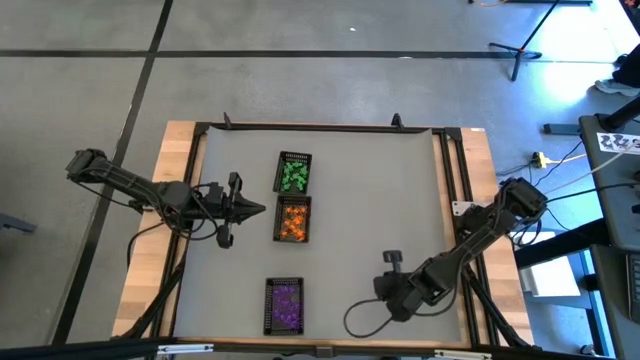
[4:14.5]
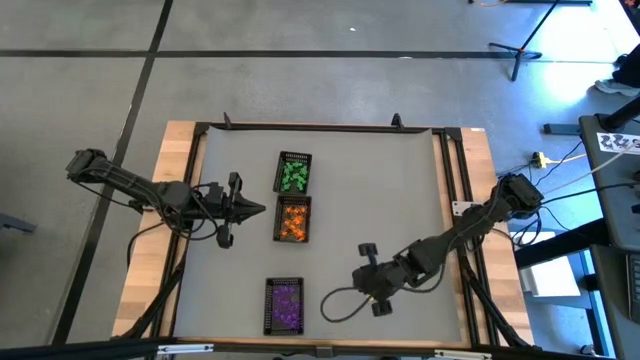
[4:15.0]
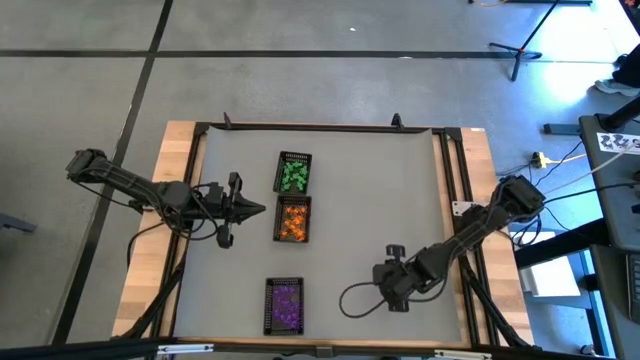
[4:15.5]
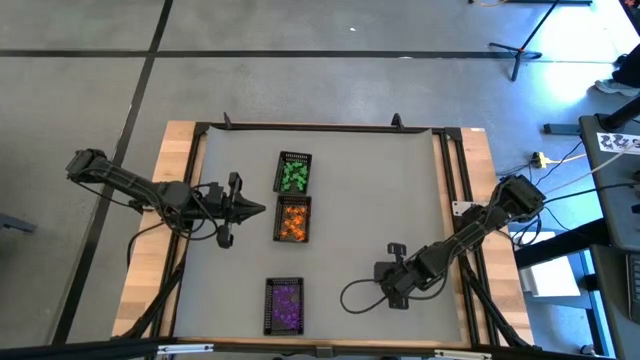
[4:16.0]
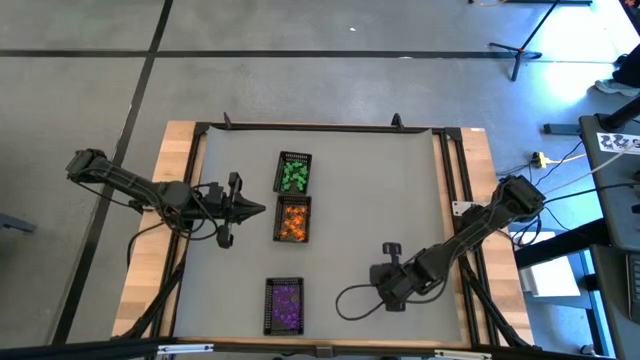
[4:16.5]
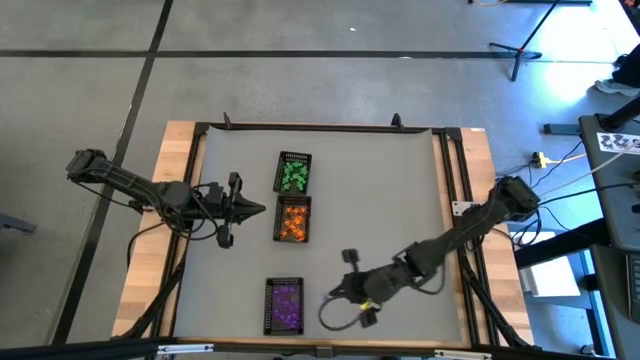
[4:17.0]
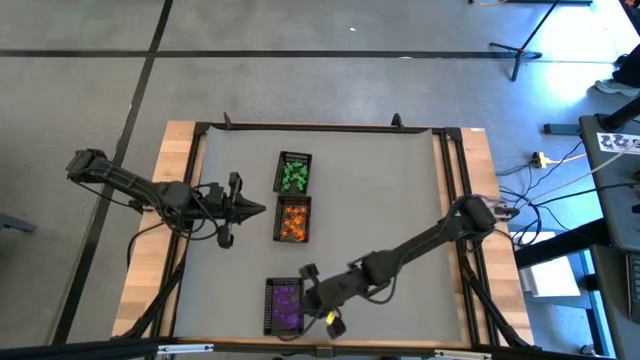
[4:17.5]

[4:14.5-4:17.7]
Task: Sort Halloween decoration
Put the violet spider toy into the bottom black bin

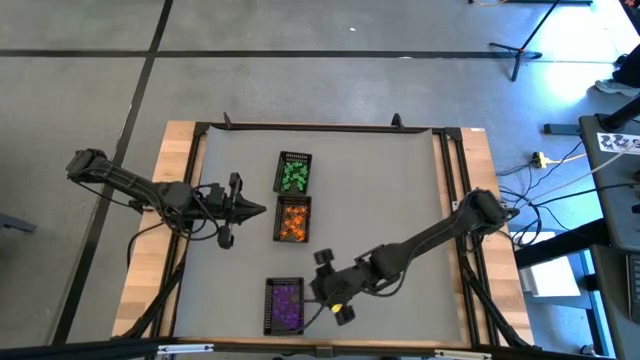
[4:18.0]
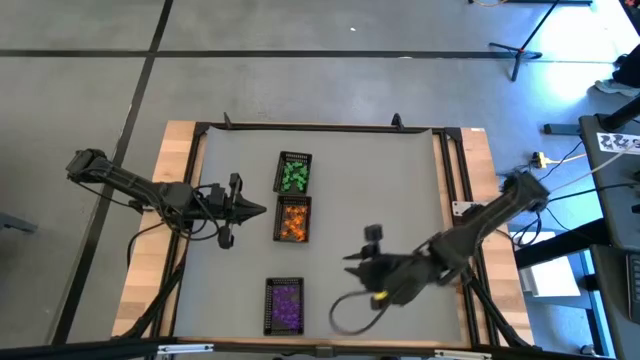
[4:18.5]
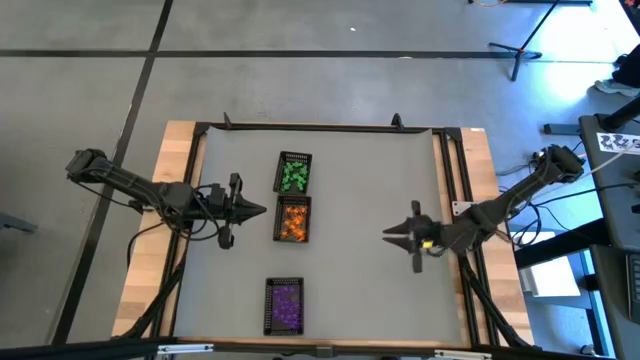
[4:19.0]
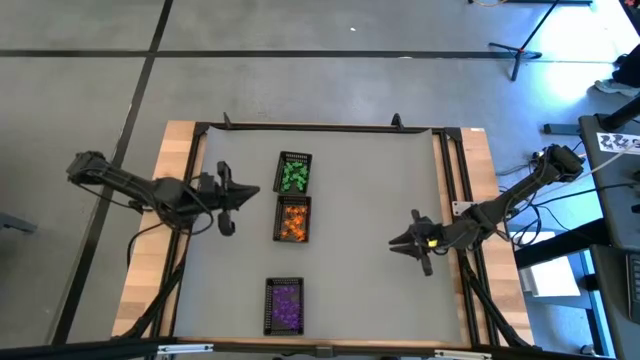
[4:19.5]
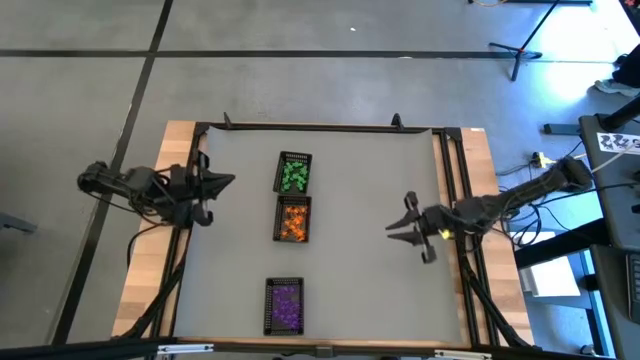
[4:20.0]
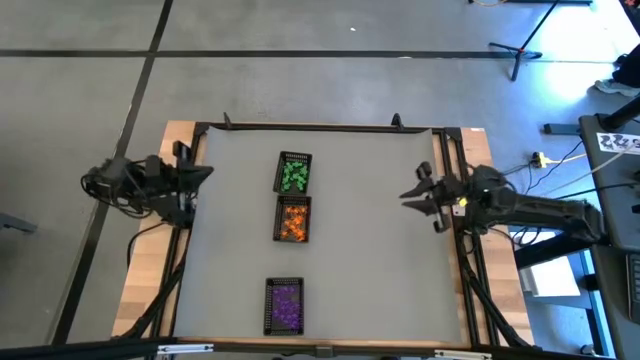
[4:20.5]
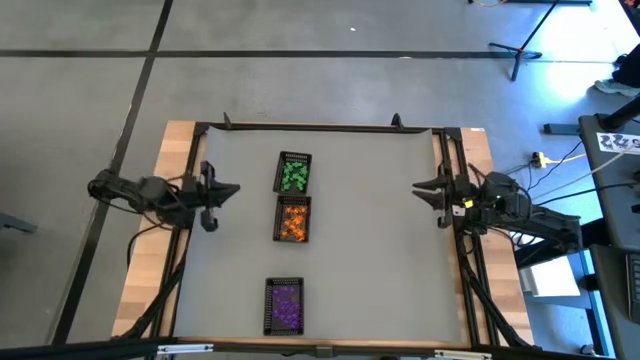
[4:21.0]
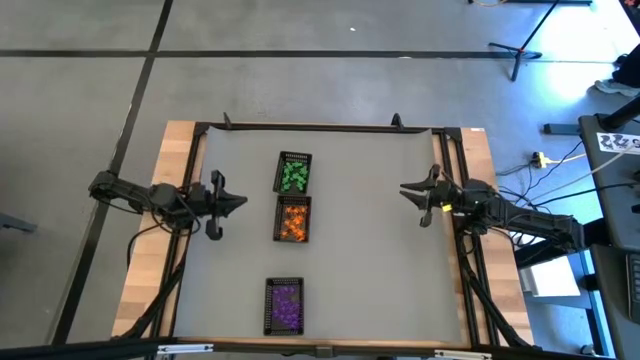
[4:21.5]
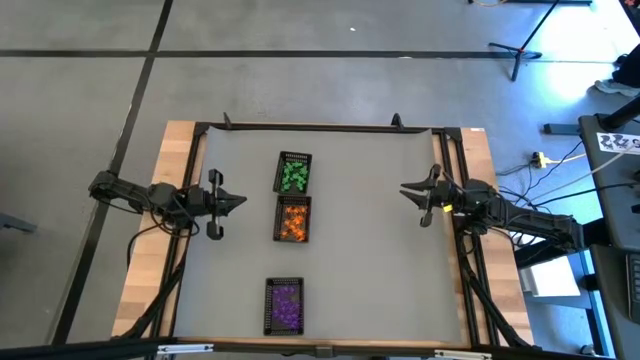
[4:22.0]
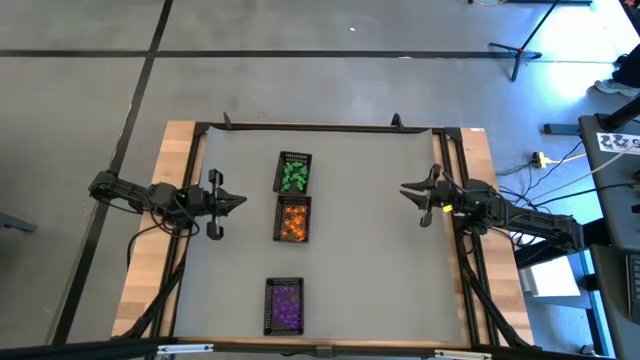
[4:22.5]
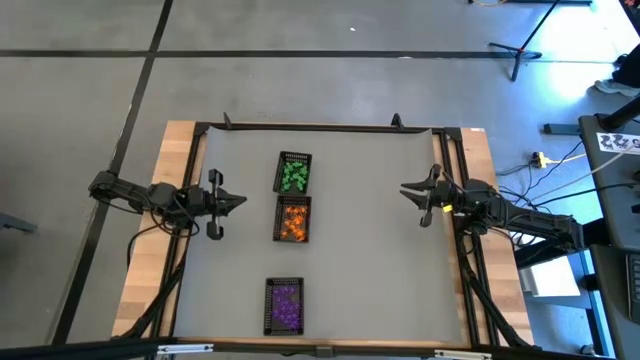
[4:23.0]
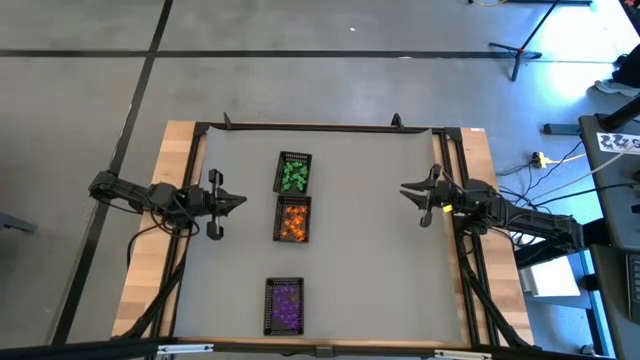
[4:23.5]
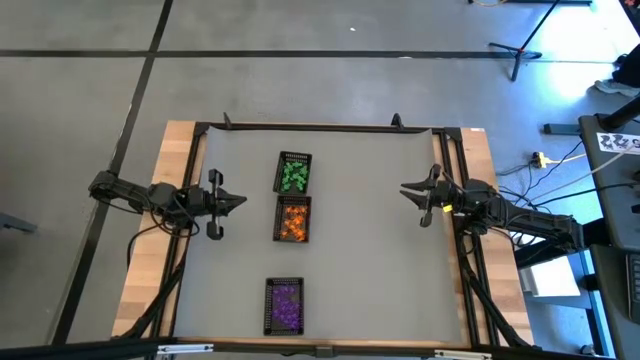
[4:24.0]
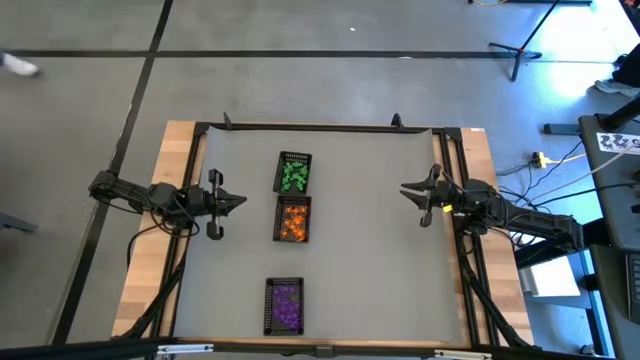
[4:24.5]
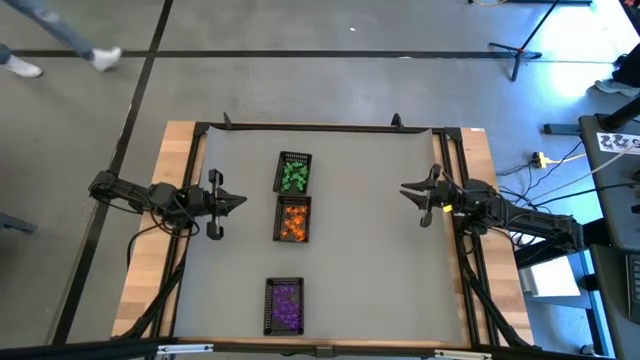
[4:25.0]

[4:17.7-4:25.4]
Return to Home Position
